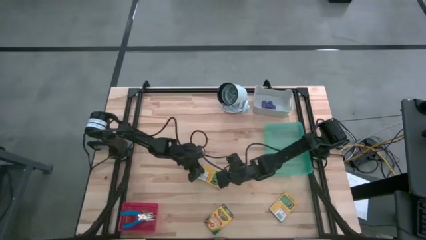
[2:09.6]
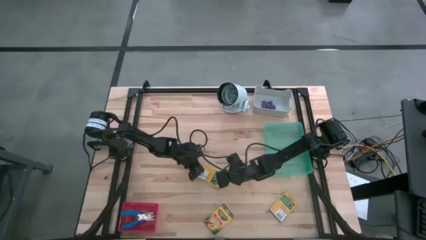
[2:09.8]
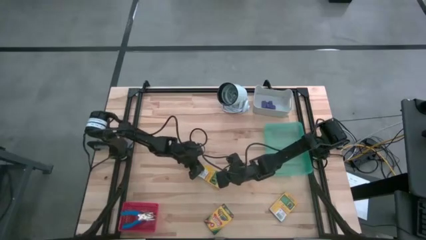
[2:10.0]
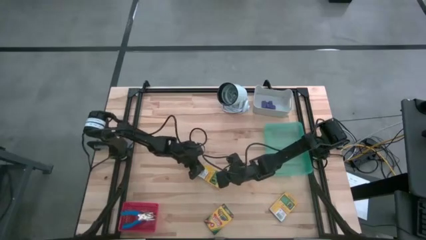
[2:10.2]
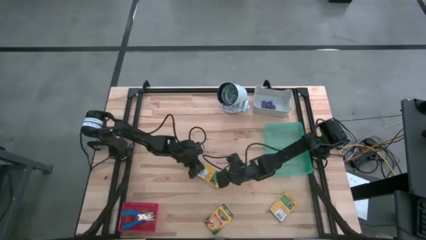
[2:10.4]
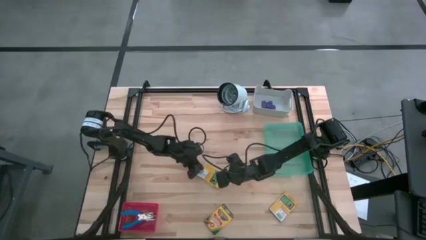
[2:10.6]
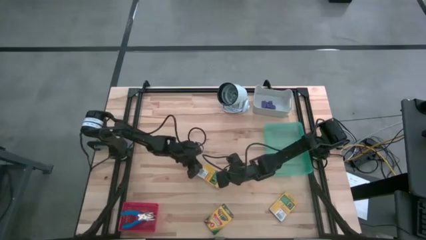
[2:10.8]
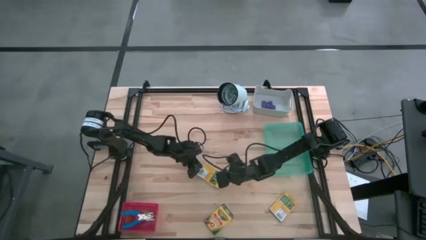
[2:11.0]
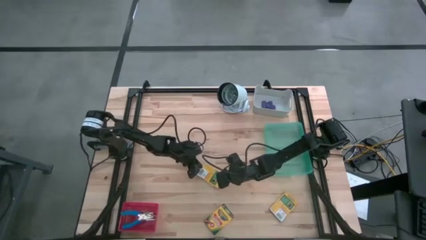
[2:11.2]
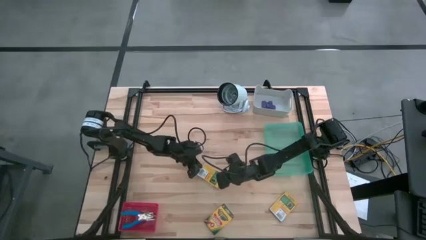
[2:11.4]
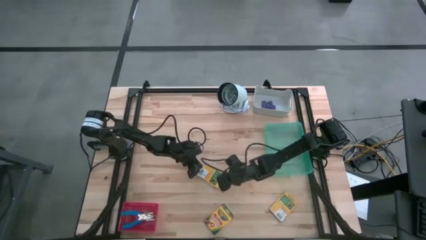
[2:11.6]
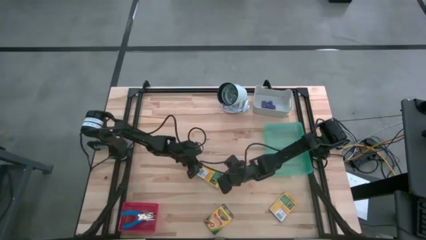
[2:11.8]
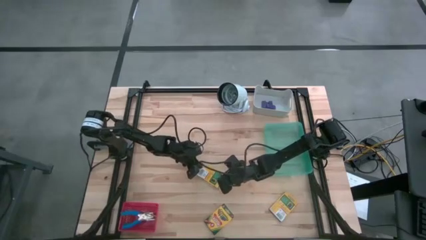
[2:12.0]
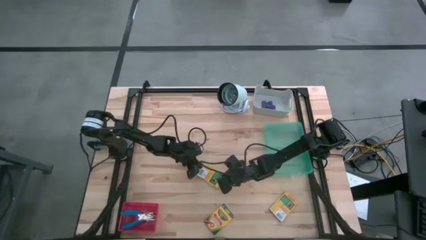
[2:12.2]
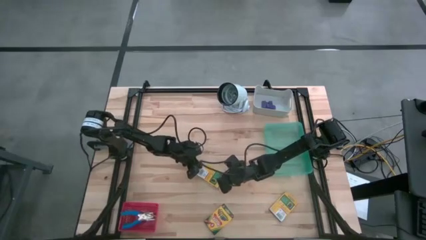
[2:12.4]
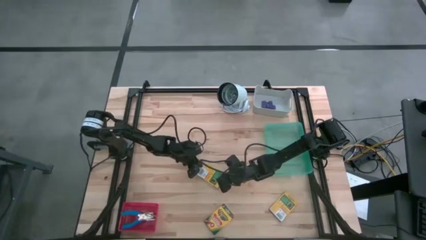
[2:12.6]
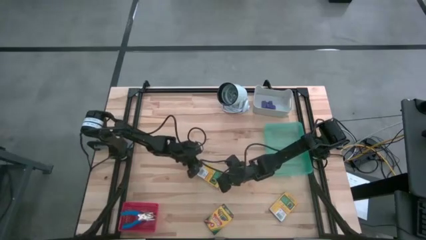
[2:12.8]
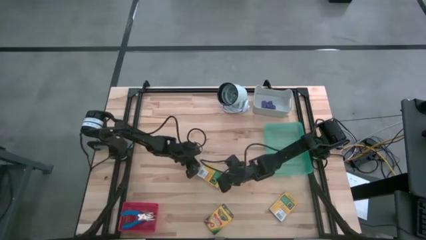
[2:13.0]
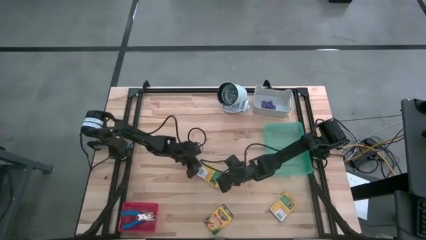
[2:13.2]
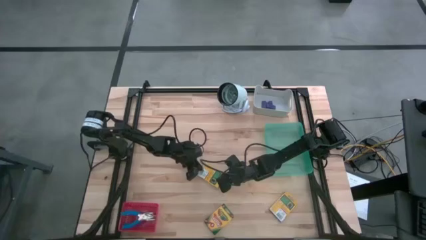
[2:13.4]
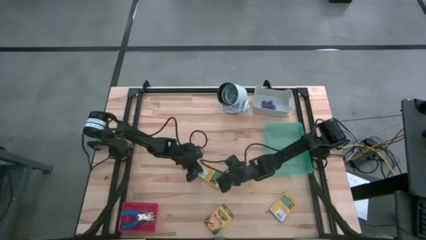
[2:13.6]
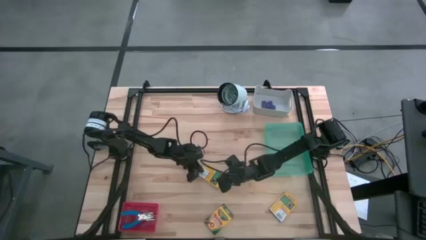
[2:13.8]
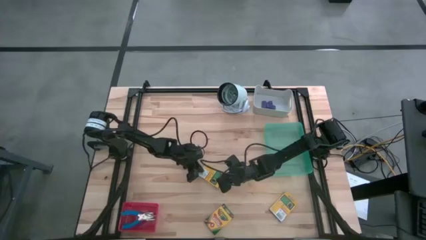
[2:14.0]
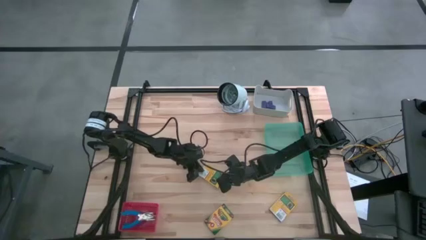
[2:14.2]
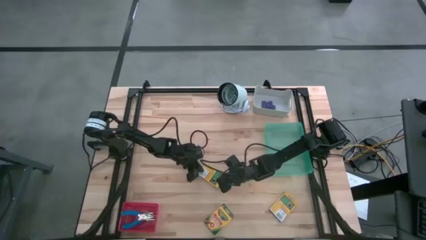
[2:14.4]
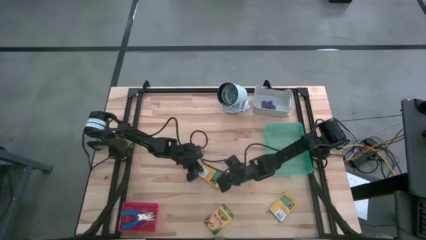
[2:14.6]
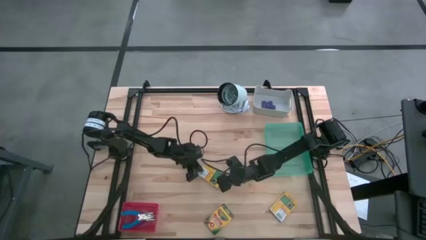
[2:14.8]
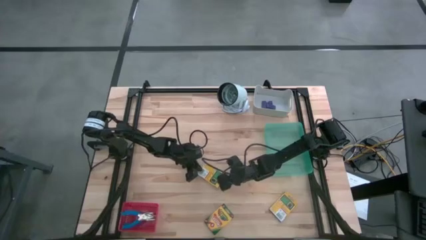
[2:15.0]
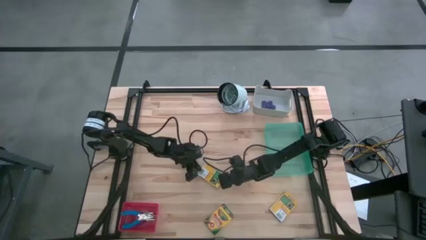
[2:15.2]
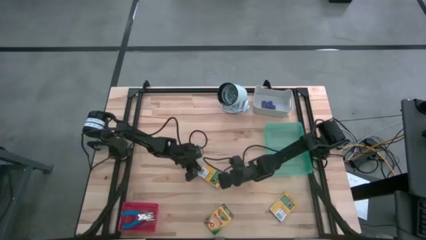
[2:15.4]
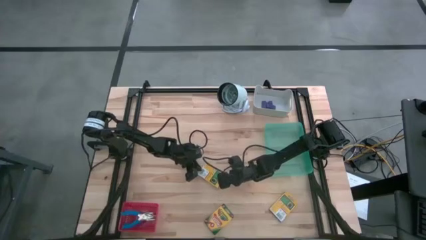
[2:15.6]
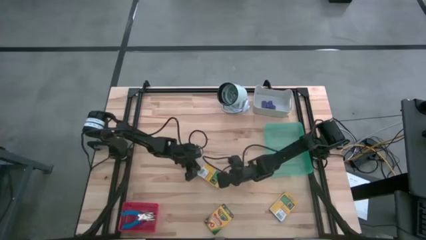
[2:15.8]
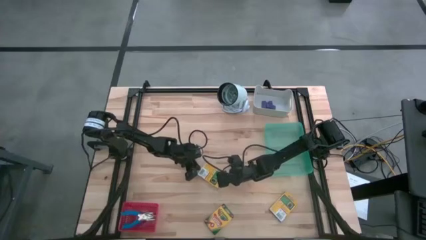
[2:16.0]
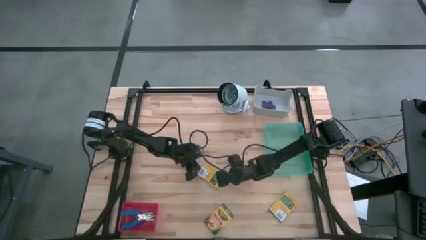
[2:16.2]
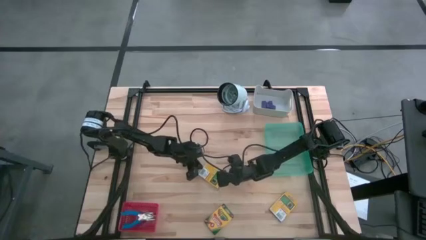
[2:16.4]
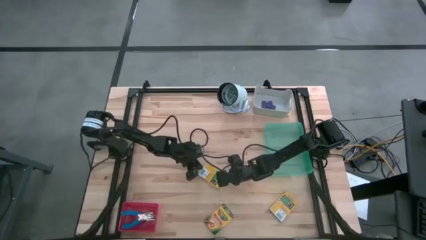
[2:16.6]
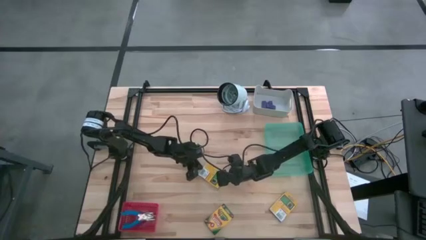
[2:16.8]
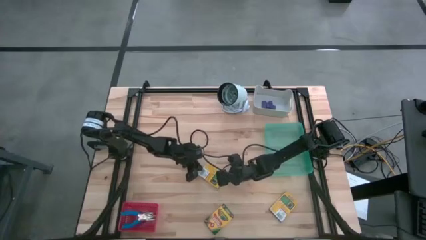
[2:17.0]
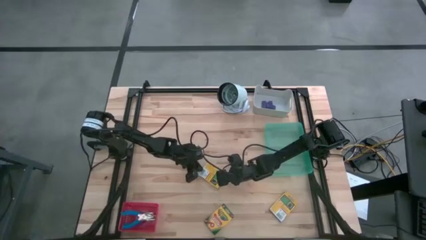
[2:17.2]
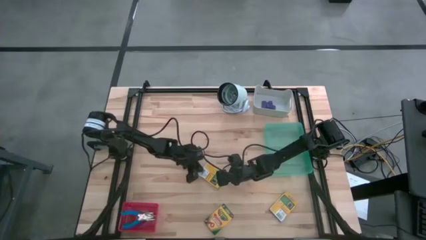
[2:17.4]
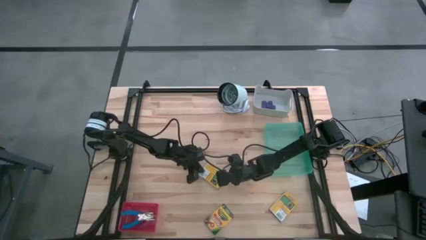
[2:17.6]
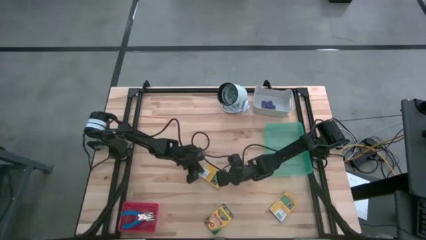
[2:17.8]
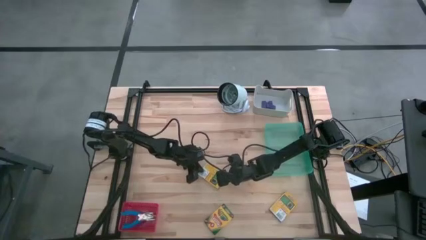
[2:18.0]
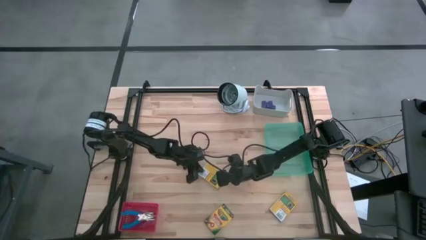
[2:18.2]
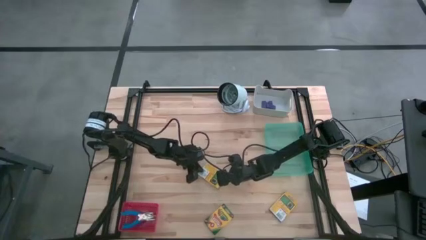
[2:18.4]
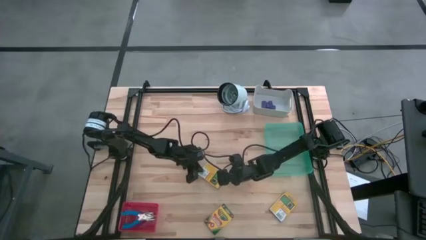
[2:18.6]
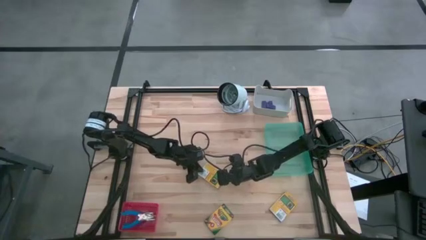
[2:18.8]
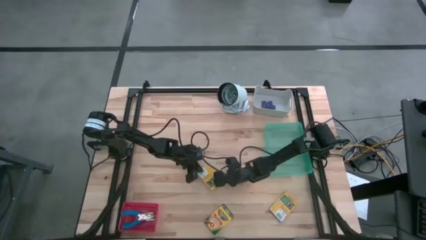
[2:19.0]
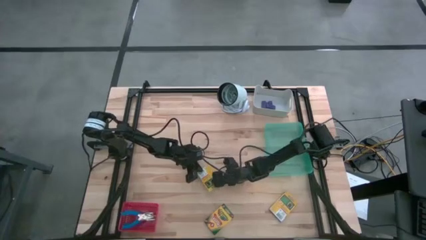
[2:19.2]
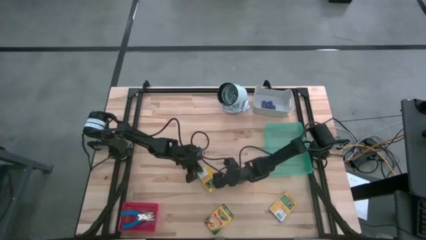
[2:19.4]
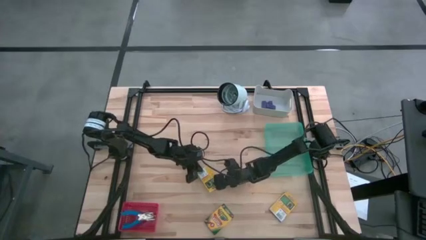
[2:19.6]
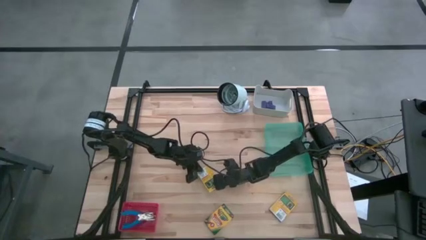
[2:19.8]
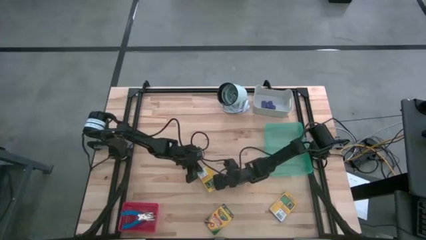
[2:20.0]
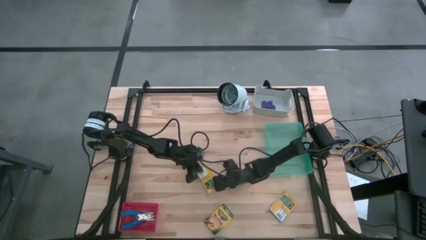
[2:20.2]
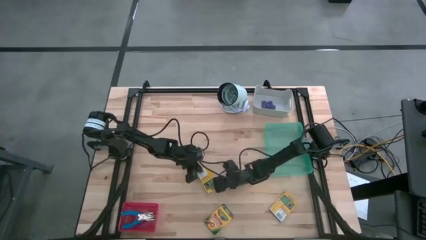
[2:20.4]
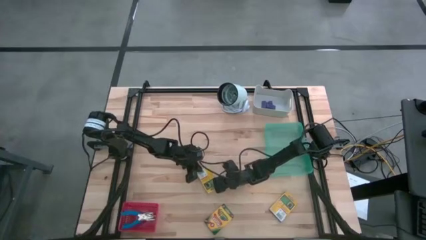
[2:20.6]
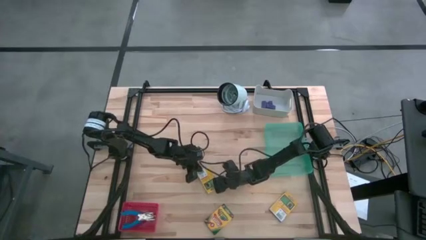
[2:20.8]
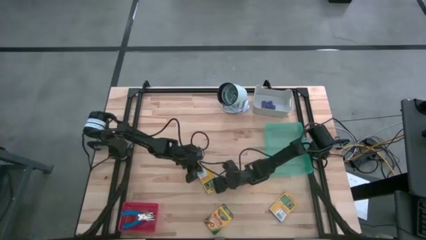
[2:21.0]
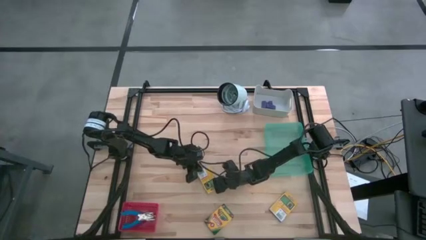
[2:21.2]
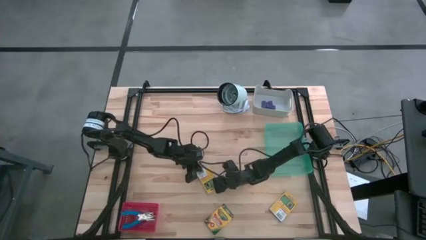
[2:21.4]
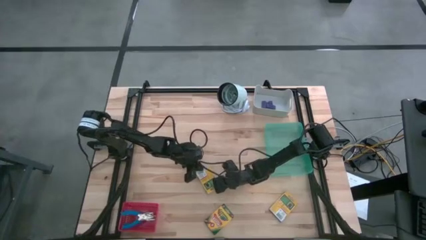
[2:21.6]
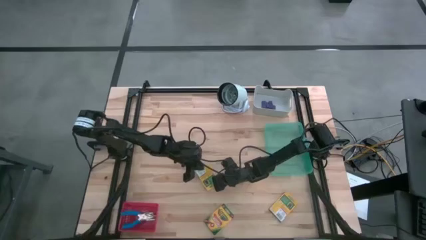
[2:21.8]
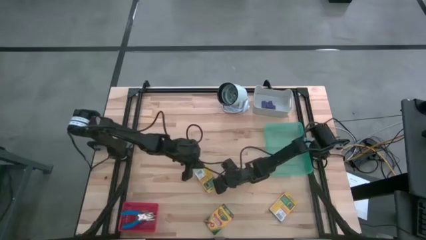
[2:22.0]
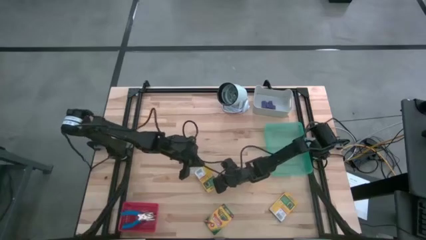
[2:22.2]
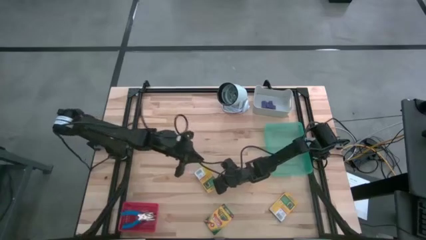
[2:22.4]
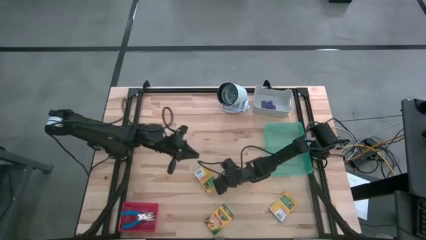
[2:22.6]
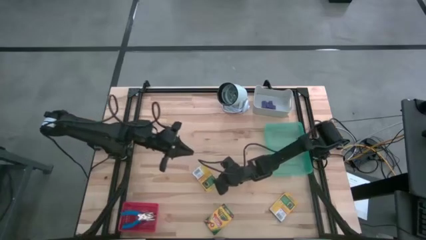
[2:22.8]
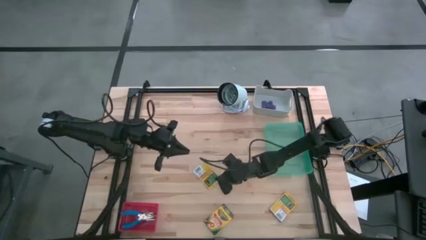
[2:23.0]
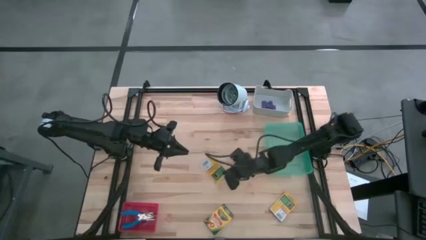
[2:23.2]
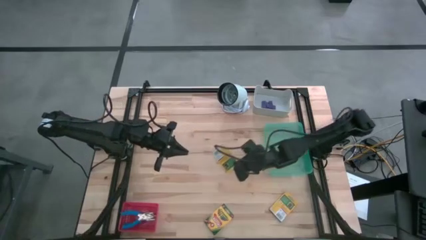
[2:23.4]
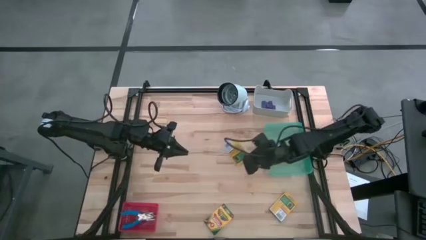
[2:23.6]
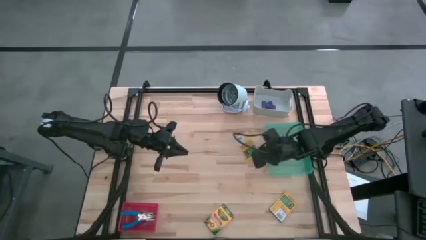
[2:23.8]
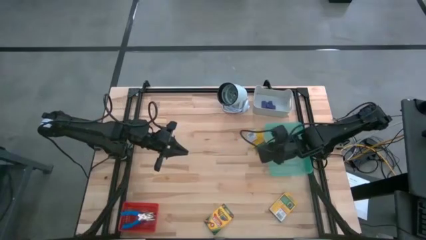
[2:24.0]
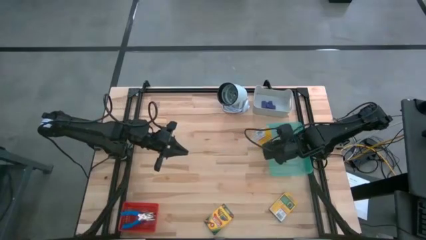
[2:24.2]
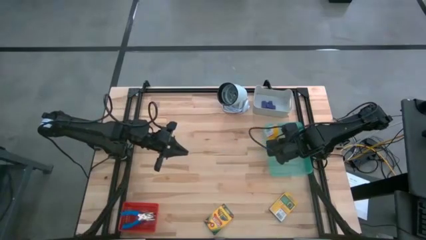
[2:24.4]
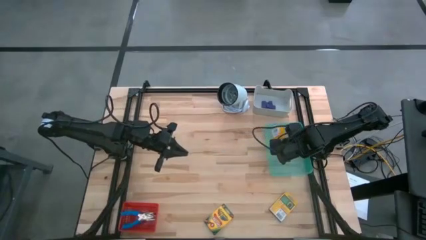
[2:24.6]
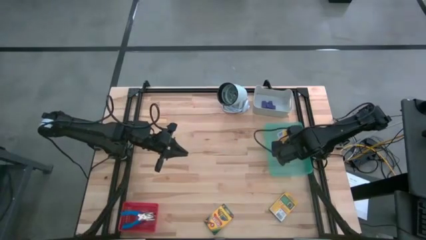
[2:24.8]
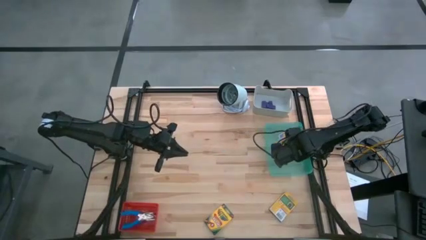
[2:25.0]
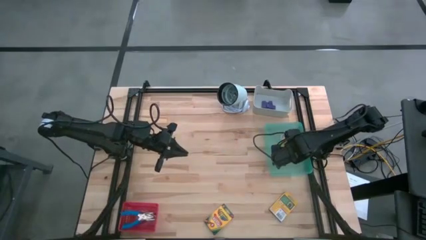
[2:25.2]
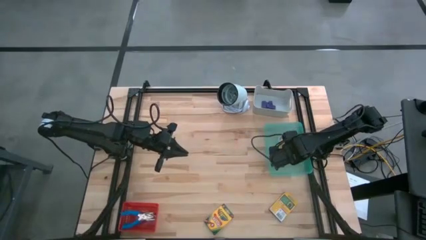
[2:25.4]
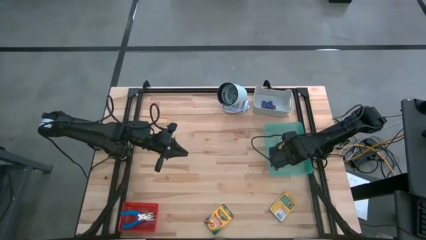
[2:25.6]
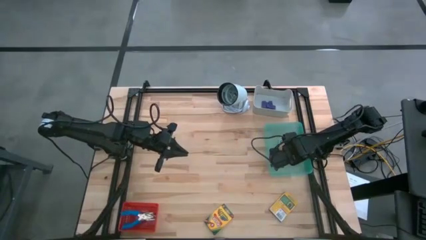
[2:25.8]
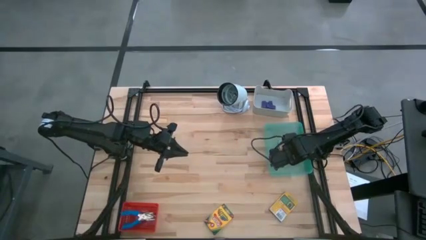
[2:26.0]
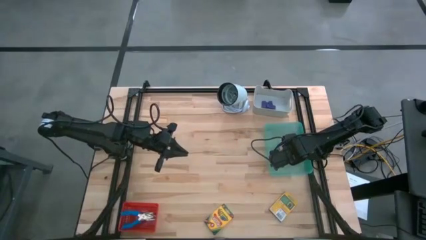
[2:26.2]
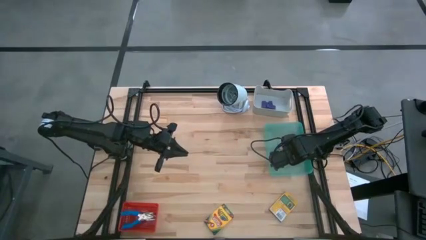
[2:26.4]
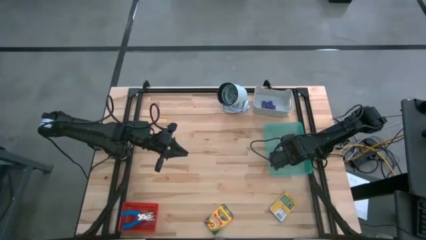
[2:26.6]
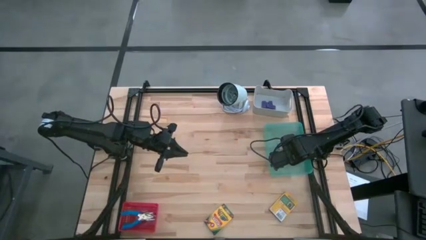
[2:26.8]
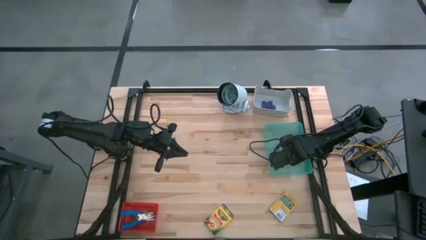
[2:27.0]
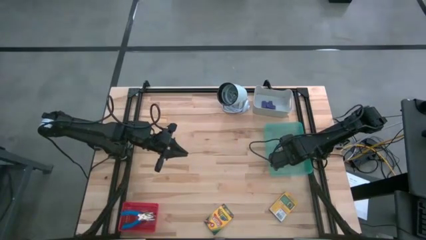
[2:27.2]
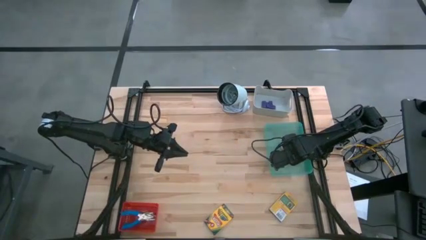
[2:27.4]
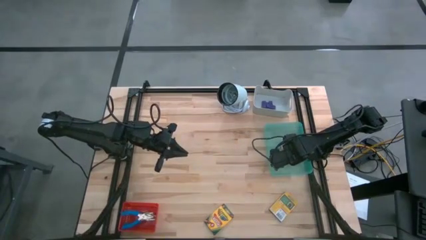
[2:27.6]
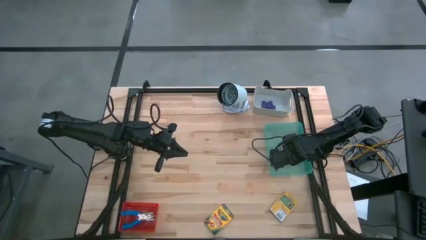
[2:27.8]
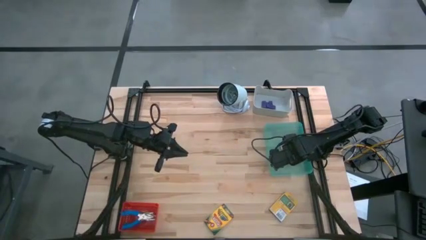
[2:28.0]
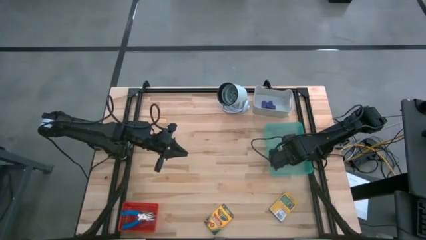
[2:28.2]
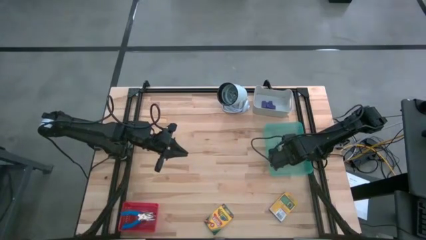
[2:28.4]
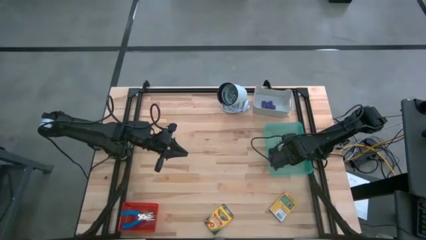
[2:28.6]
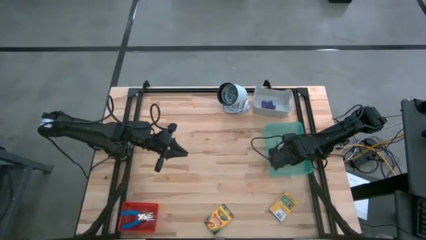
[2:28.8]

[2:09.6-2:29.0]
Task: Pick & Place School Supplies
Put the crayon box into the green bin
